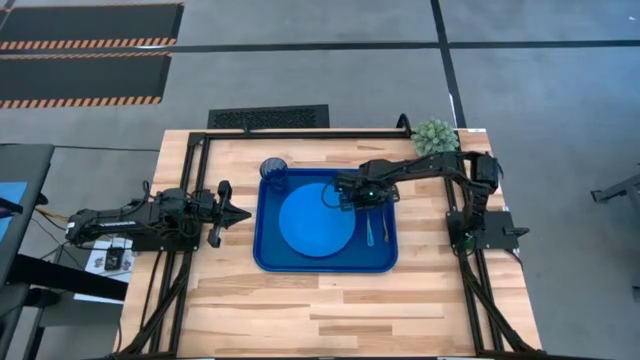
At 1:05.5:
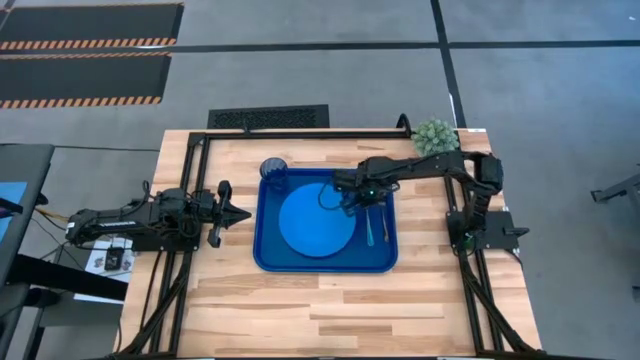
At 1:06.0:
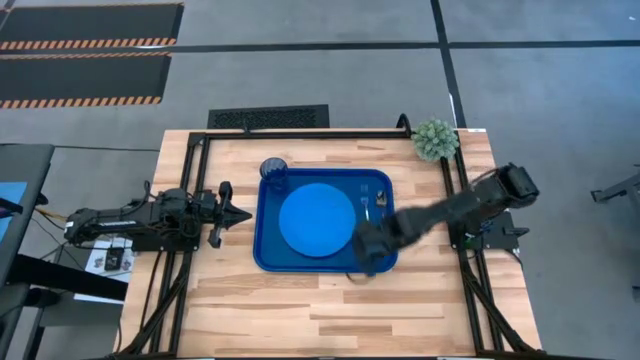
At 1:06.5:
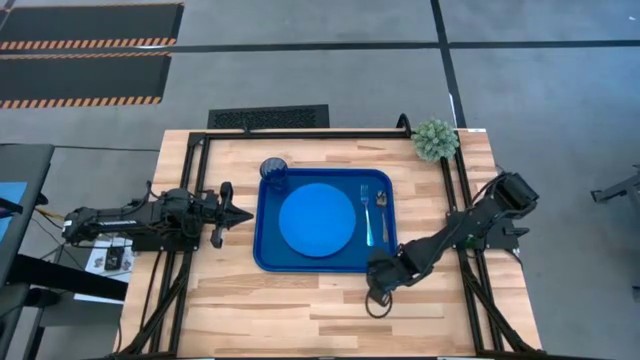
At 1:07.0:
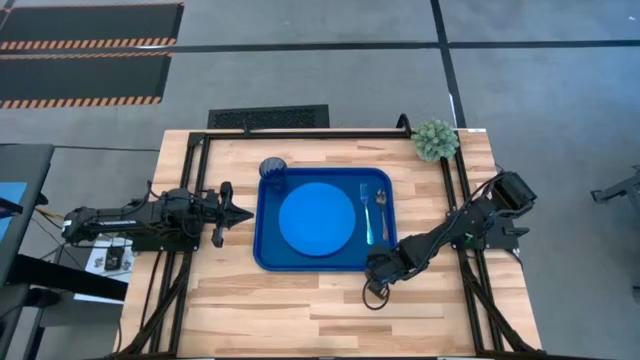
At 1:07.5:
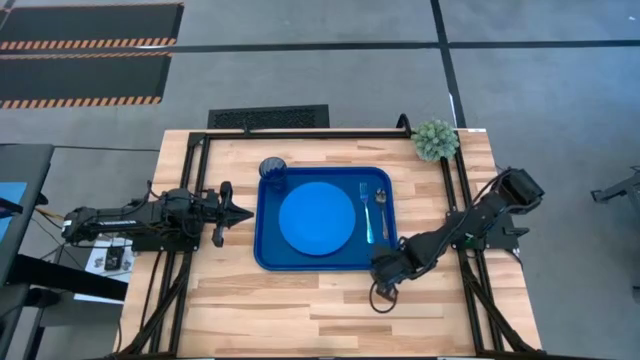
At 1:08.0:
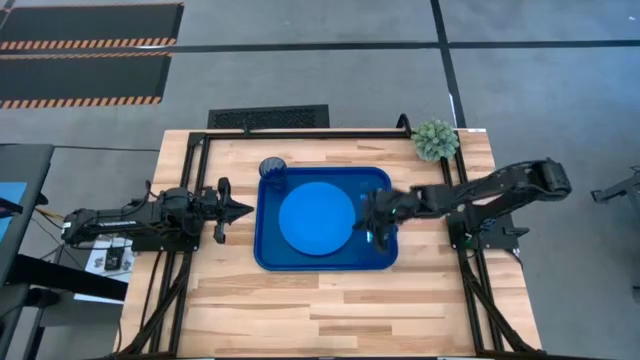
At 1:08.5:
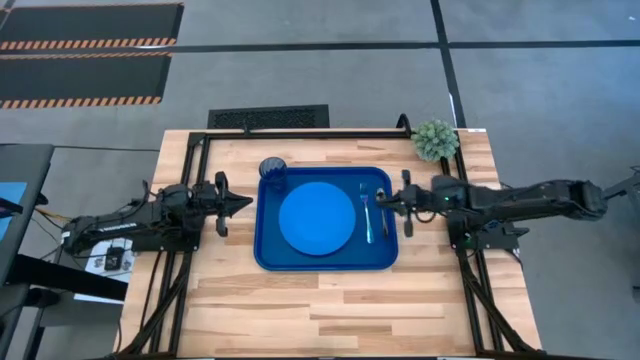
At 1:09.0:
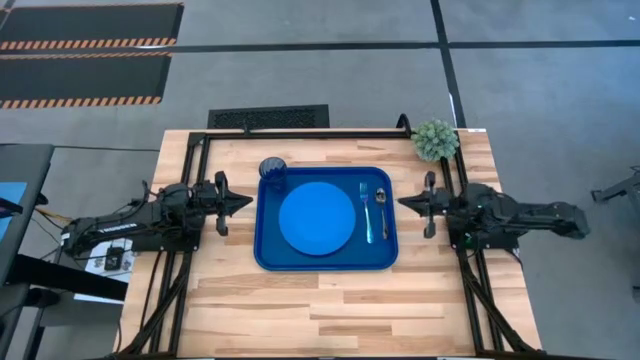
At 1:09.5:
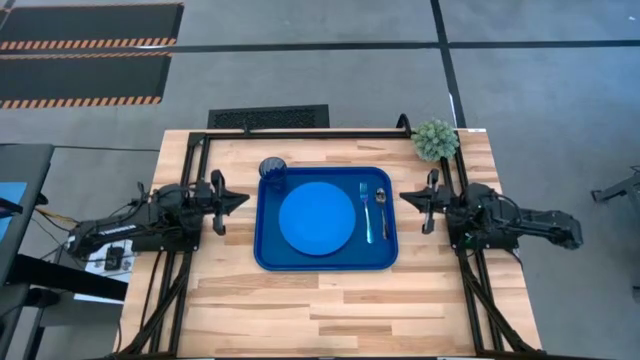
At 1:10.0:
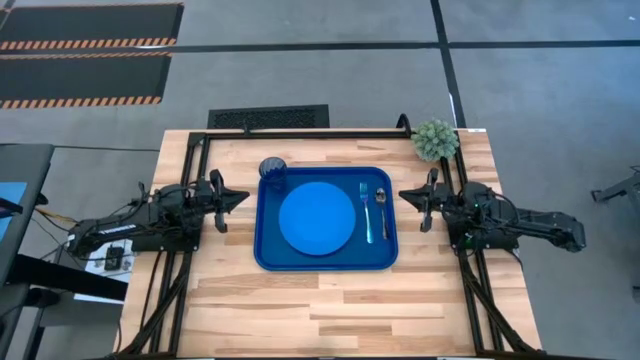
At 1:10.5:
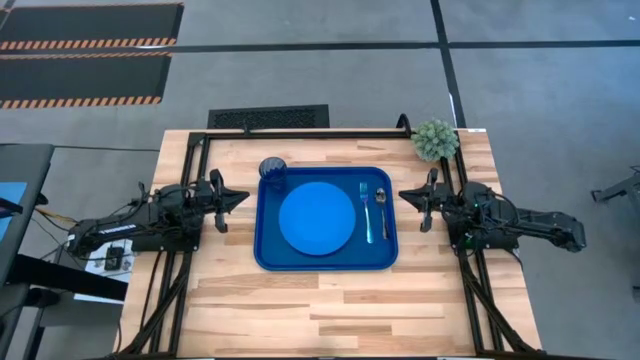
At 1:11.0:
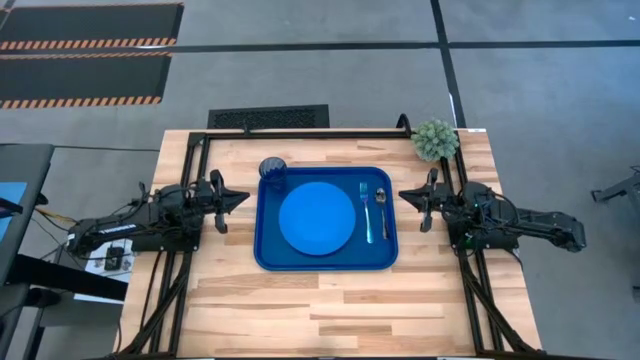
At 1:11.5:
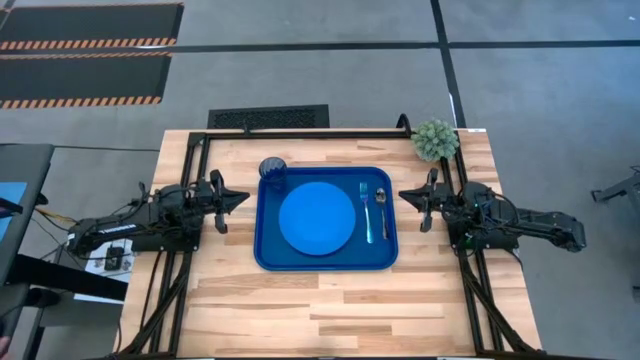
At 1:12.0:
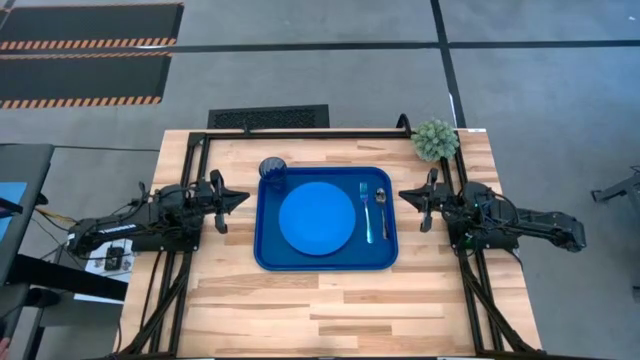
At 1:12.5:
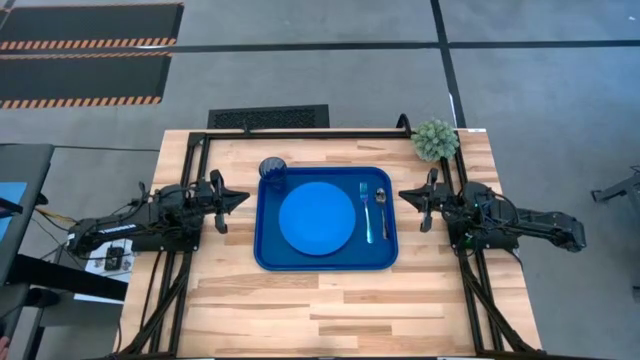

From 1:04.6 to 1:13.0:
Task: Pick and place plate/cup/fork/spoon on tray
Return to Home Position

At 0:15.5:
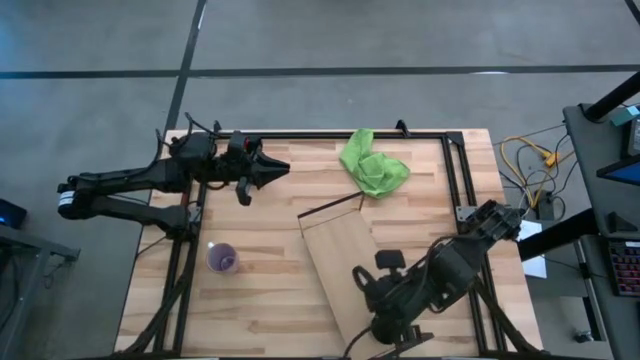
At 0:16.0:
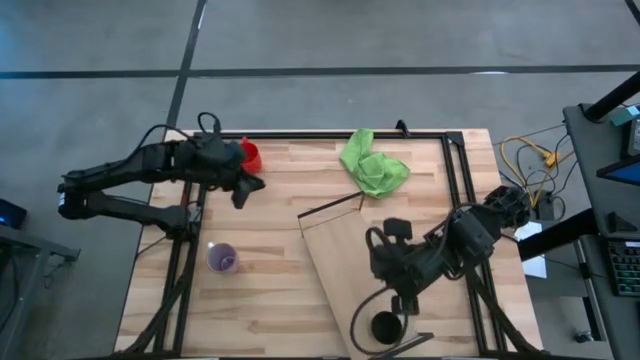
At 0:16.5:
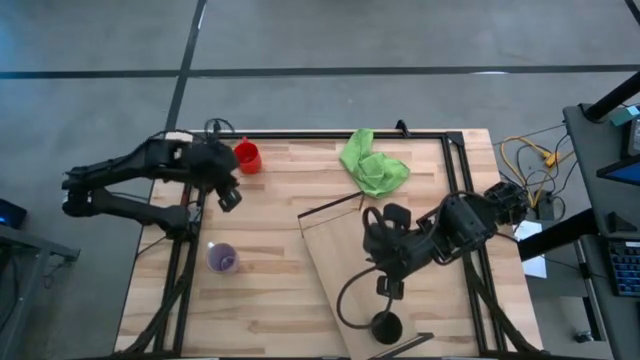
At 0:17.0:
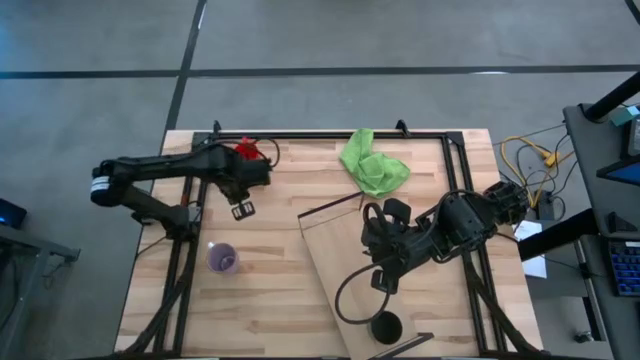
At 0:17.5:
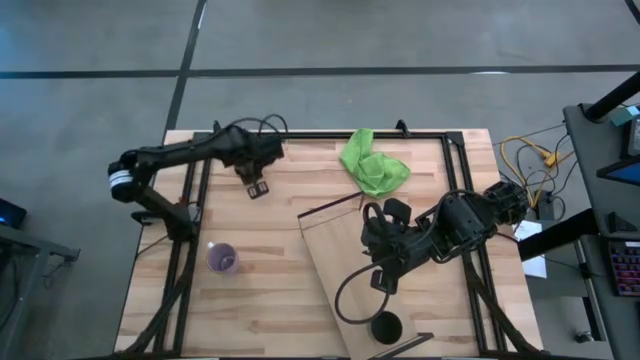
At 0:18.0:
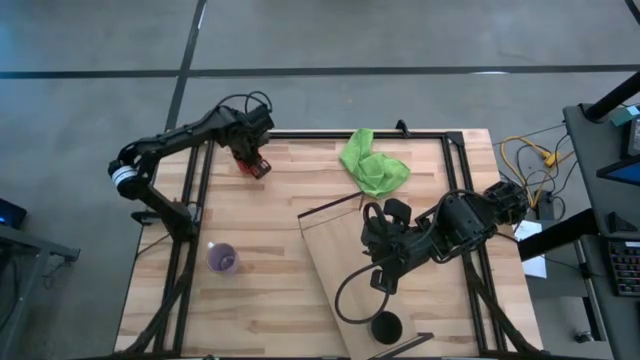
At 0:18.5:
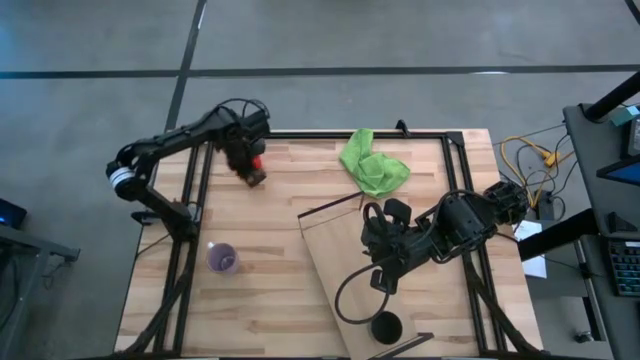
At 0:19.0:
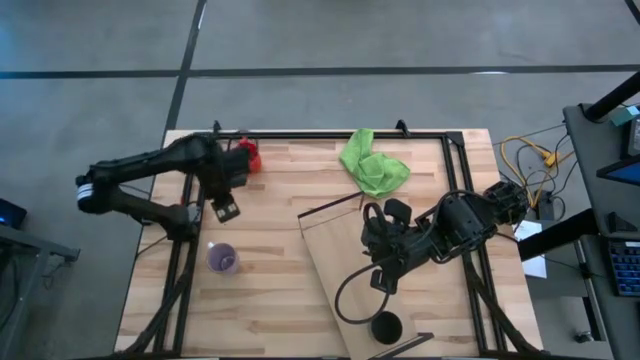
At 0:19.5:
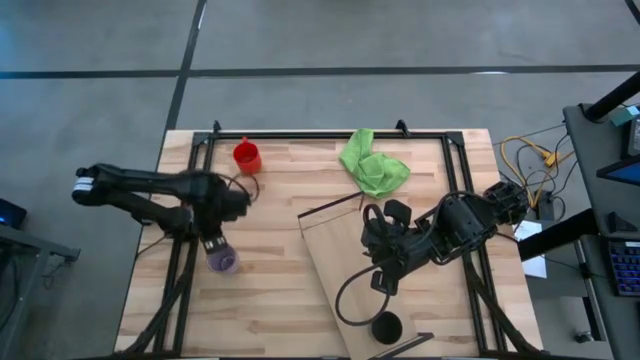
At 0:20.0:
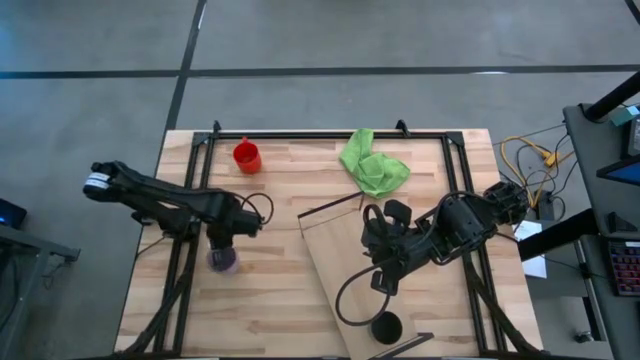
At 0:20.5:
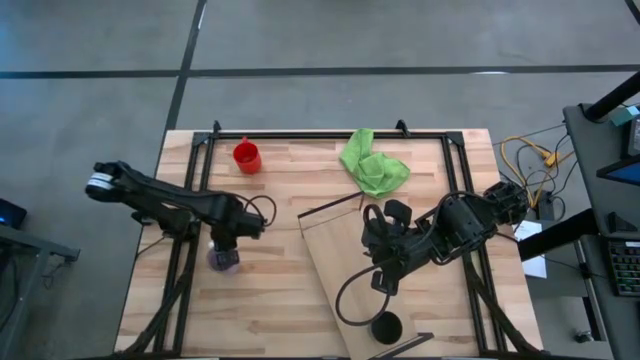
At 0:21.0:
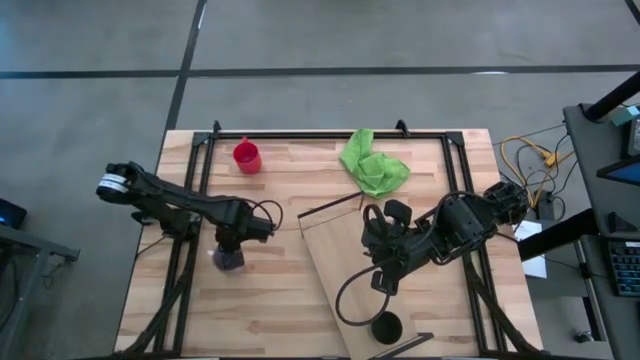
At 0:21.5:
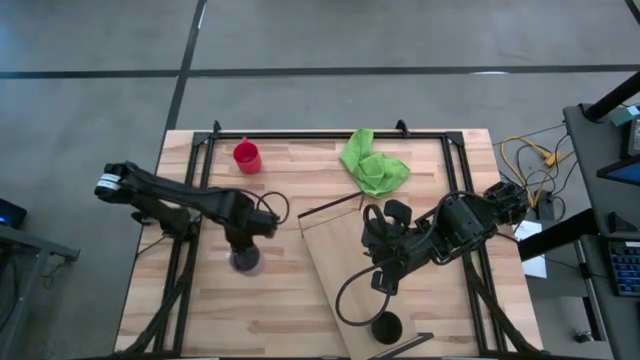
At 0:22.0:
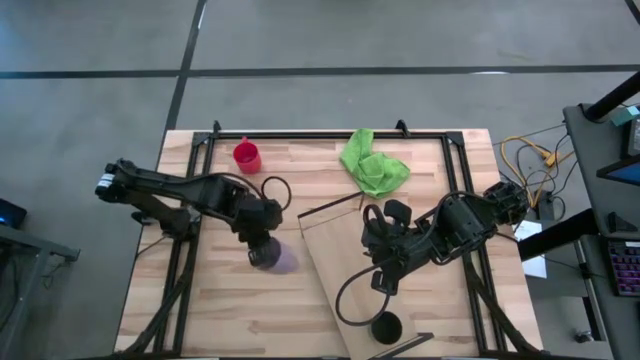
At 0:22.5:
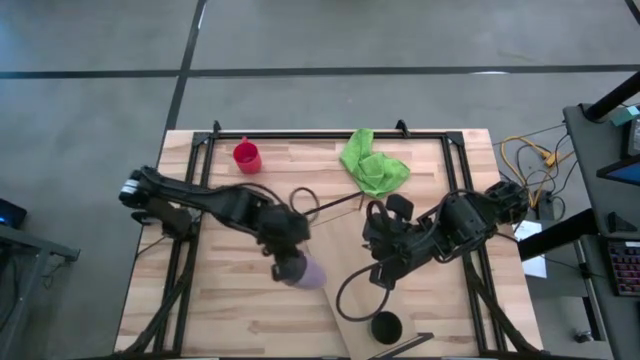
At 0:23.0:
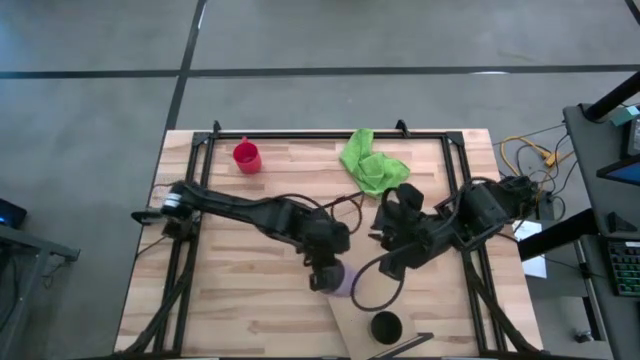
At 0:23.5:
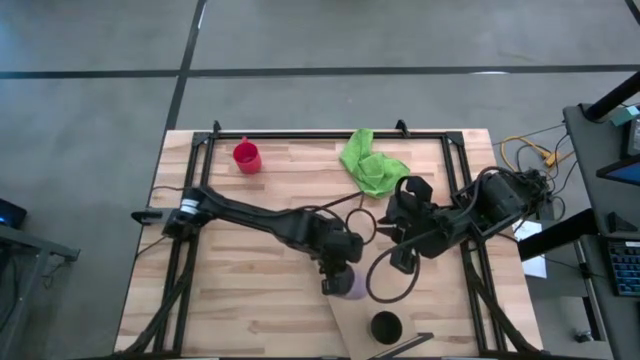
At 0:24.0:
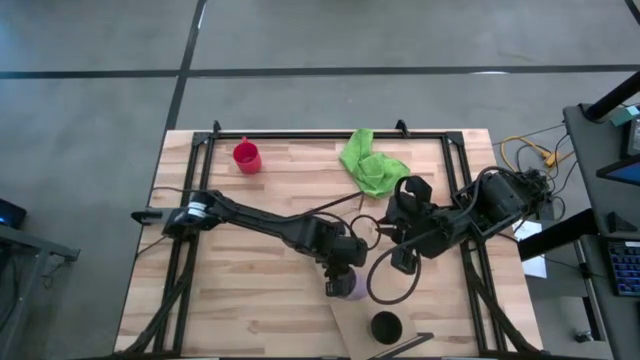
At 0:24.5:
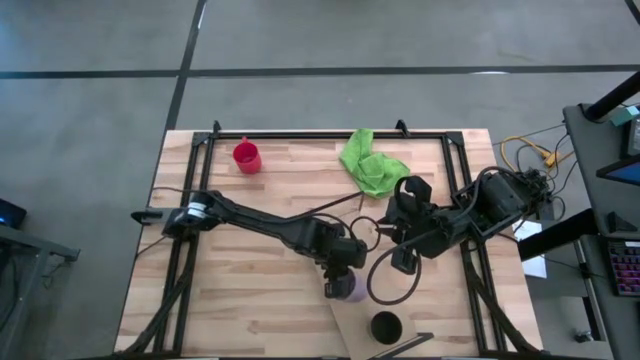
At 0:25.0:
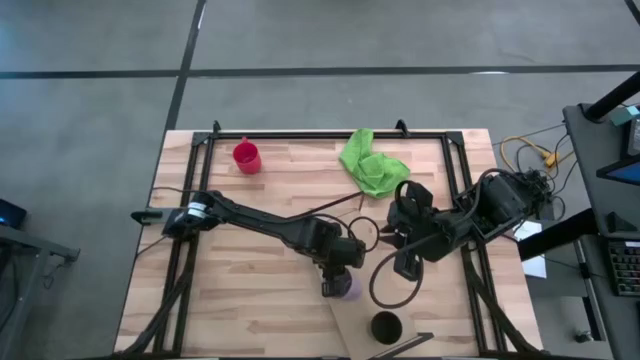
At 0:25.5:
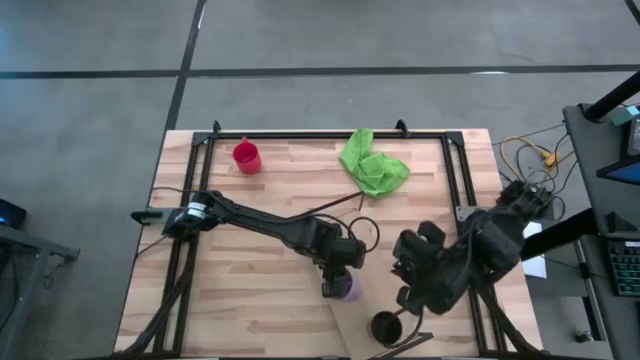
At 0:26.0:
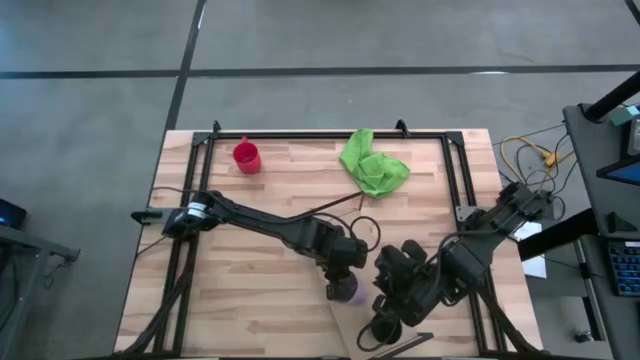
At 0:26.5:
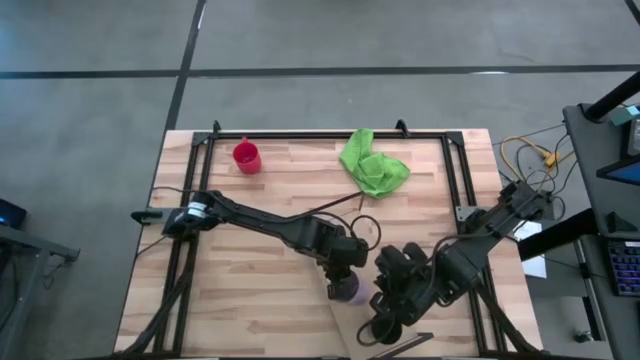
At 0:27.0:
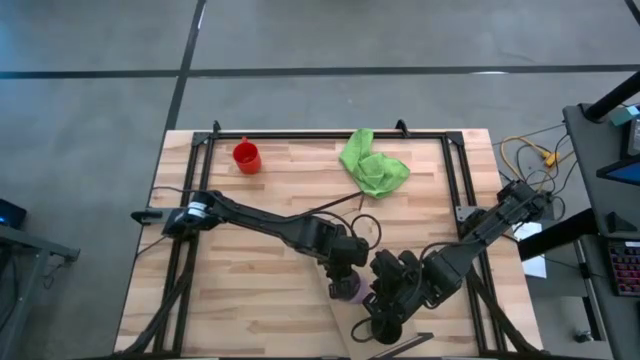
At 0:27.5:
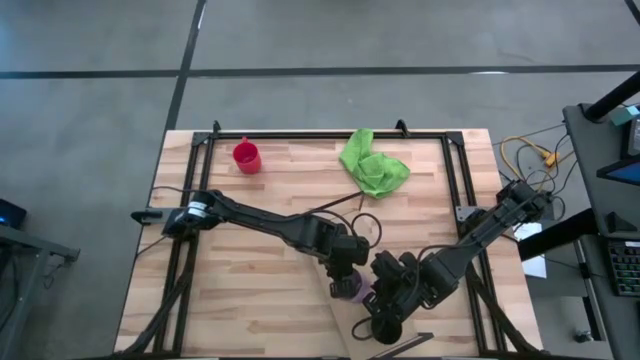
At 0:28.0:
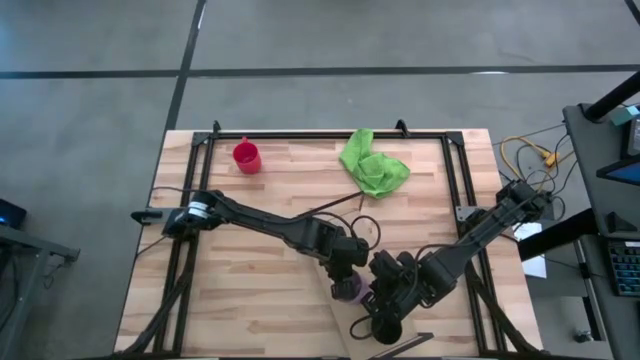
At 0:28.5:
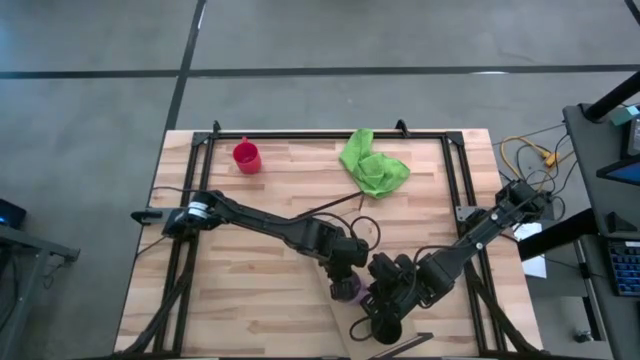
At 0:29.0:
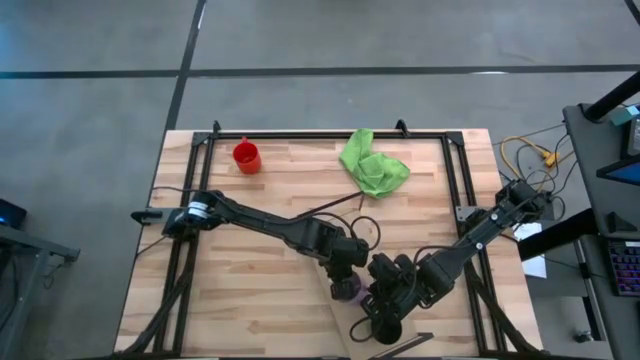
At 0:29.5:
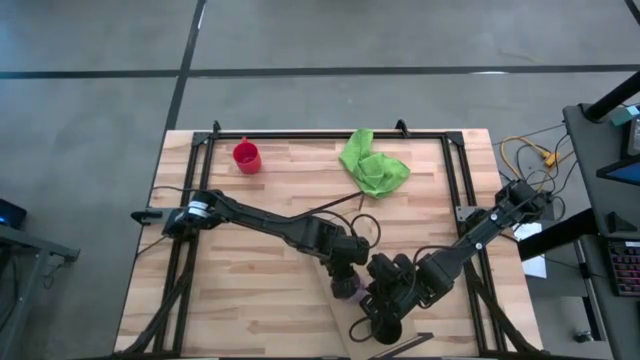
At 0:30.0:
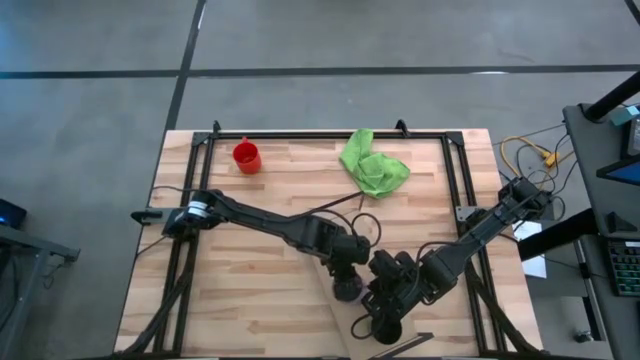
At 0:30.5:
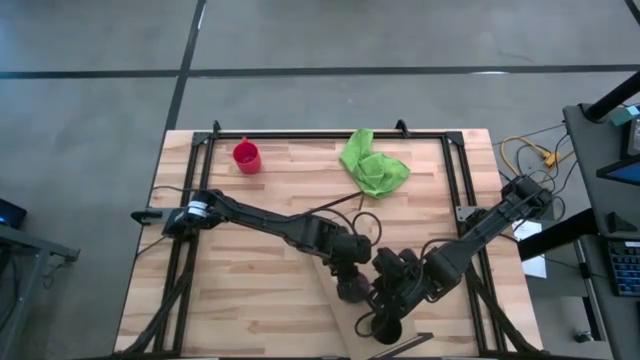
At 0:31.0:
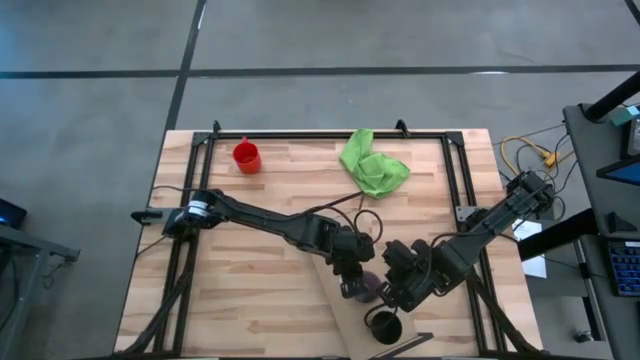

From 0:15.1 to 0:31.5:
Task: Stack small to large cups/mugs on shelf
Put the violet mug on the shelf
